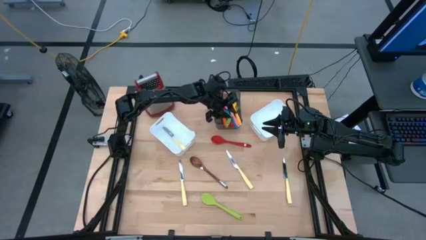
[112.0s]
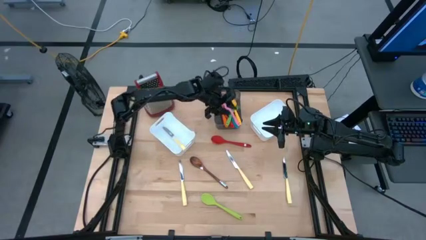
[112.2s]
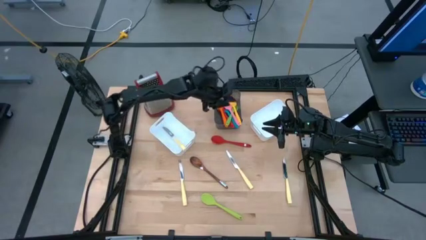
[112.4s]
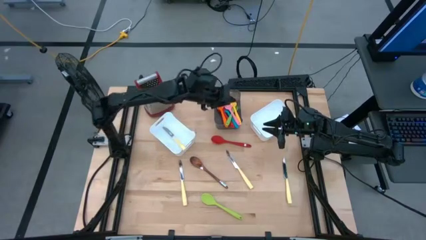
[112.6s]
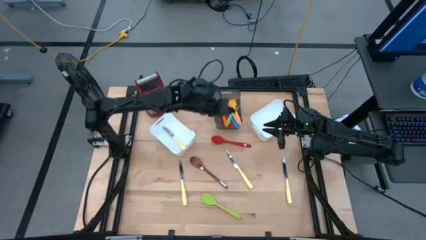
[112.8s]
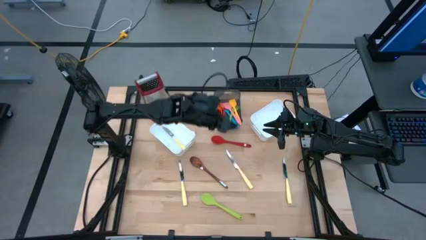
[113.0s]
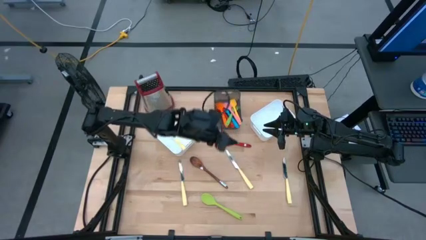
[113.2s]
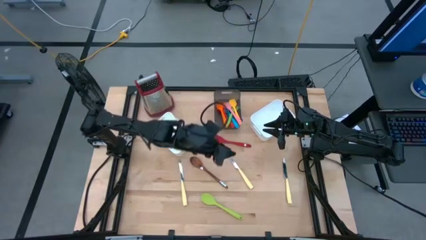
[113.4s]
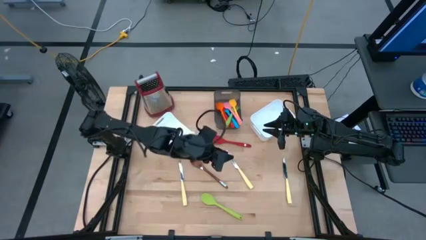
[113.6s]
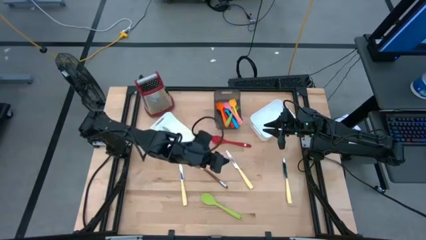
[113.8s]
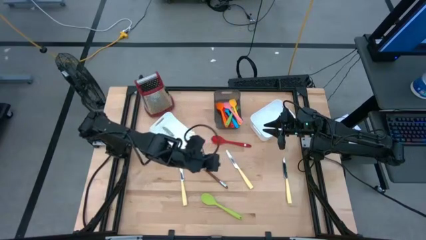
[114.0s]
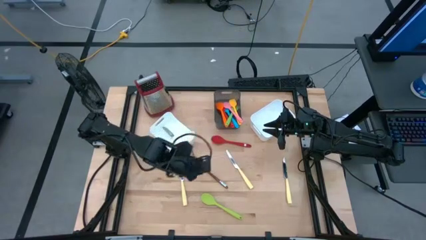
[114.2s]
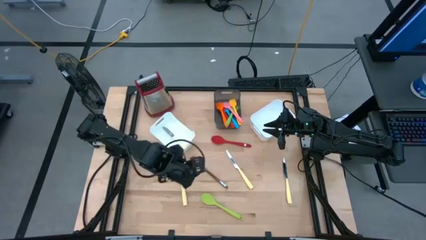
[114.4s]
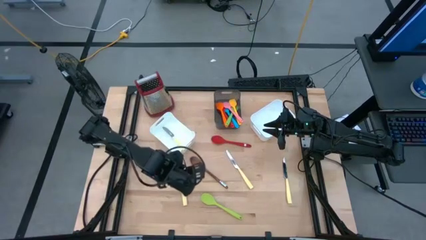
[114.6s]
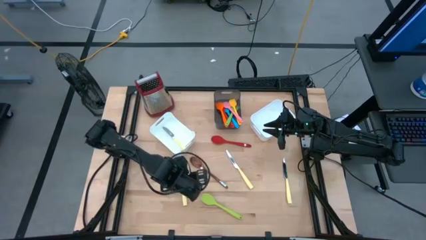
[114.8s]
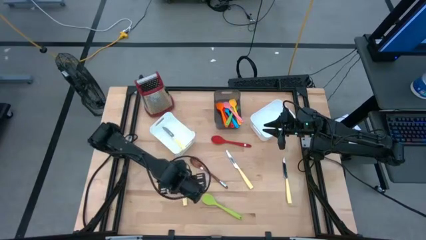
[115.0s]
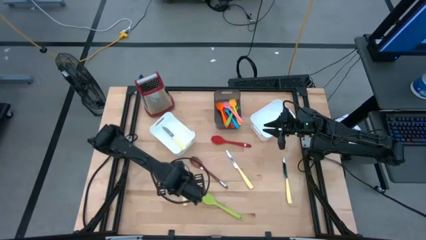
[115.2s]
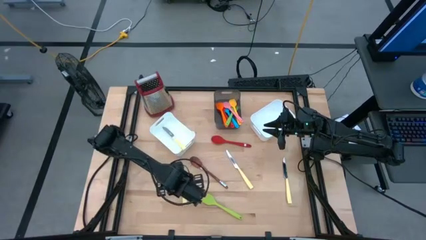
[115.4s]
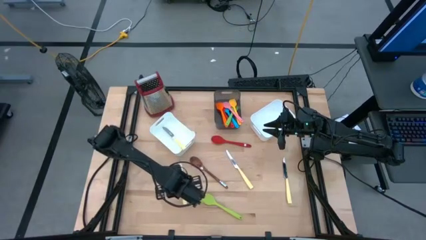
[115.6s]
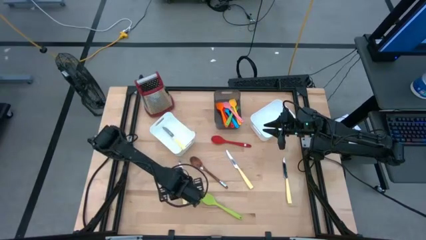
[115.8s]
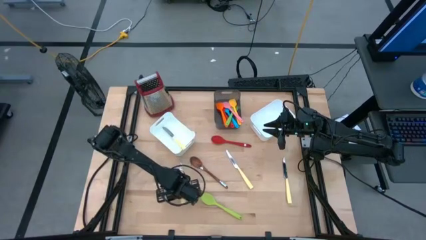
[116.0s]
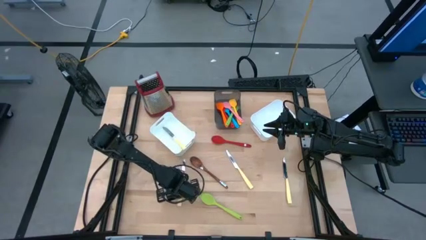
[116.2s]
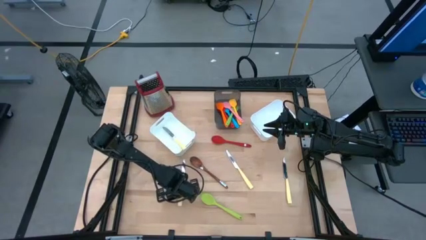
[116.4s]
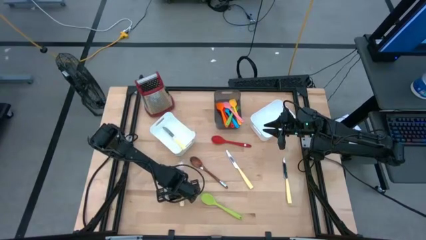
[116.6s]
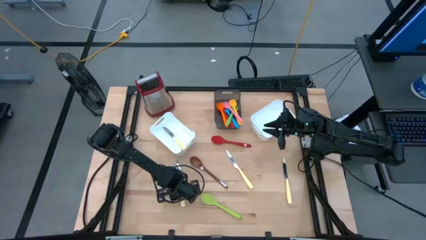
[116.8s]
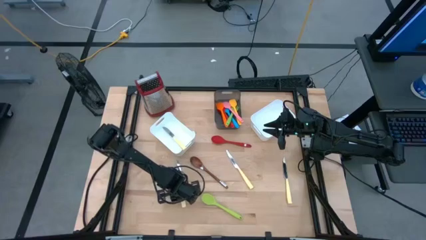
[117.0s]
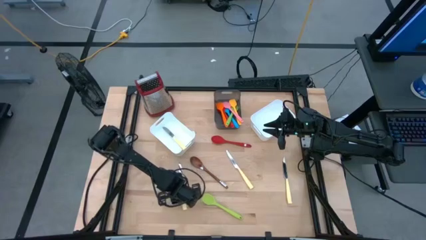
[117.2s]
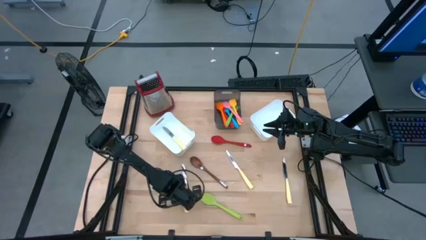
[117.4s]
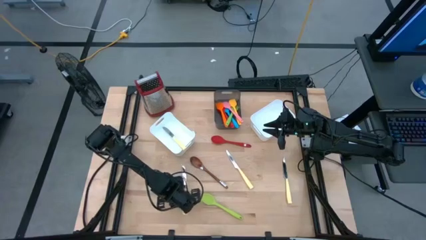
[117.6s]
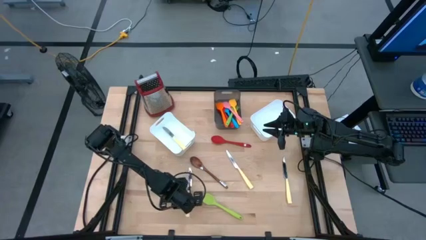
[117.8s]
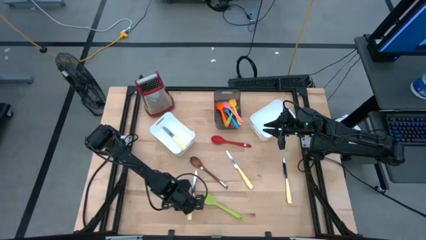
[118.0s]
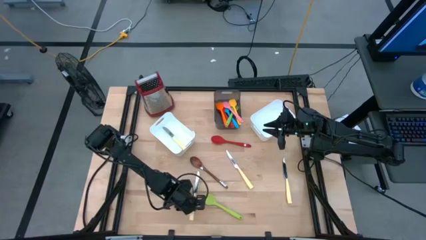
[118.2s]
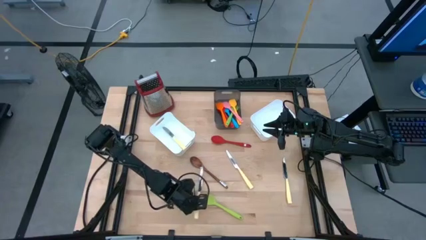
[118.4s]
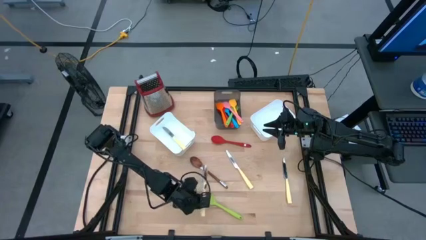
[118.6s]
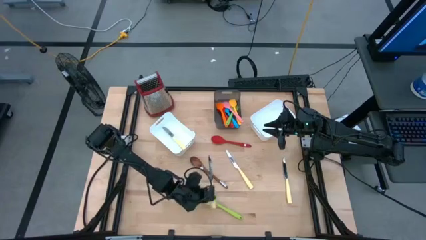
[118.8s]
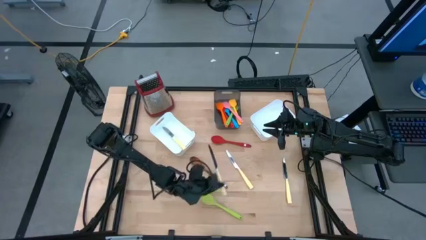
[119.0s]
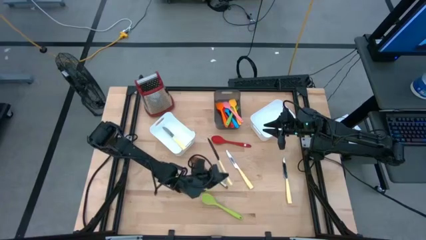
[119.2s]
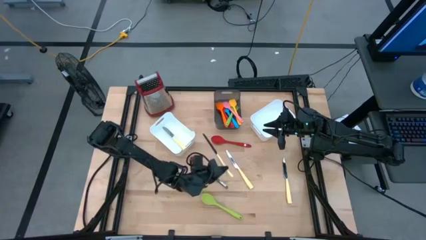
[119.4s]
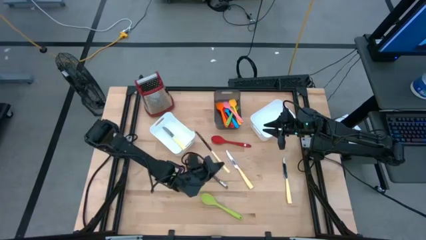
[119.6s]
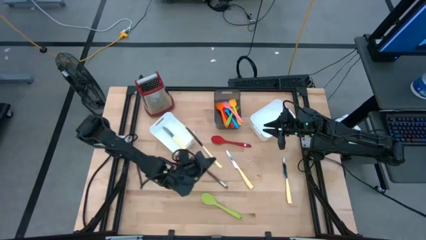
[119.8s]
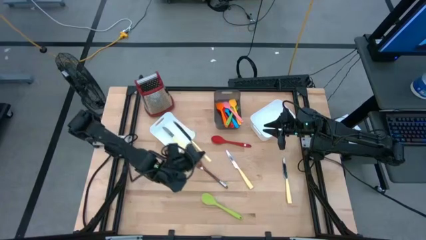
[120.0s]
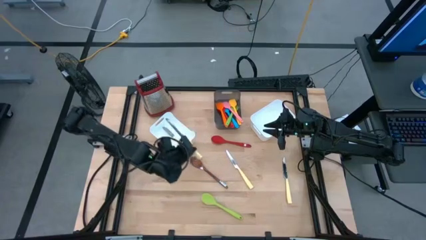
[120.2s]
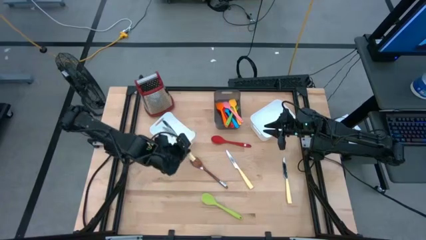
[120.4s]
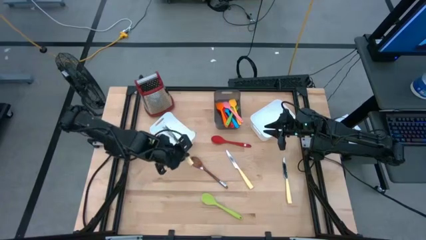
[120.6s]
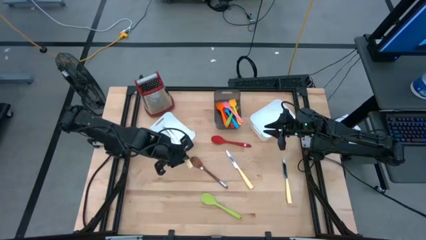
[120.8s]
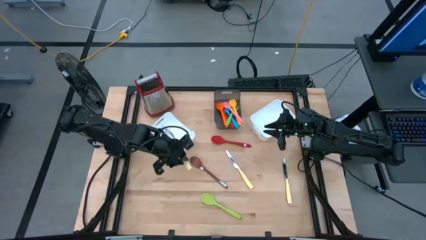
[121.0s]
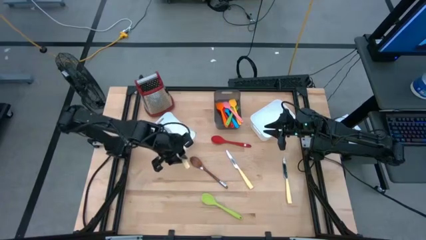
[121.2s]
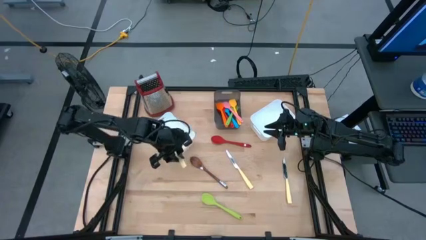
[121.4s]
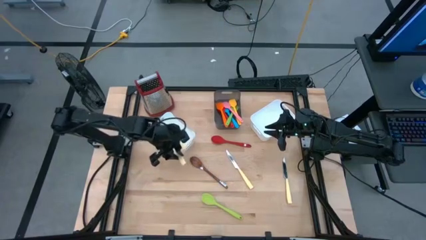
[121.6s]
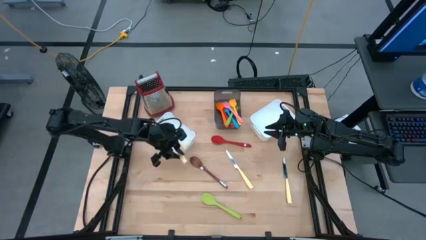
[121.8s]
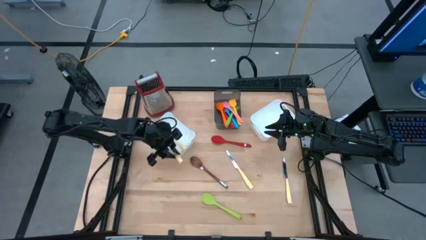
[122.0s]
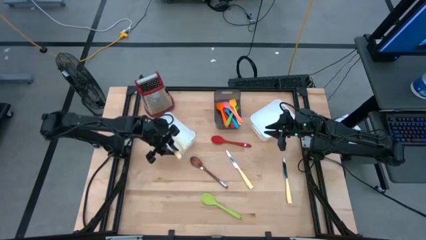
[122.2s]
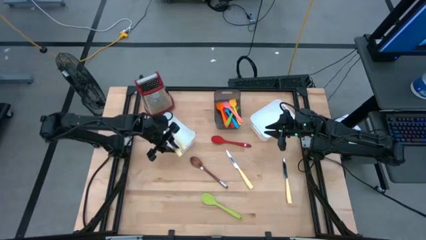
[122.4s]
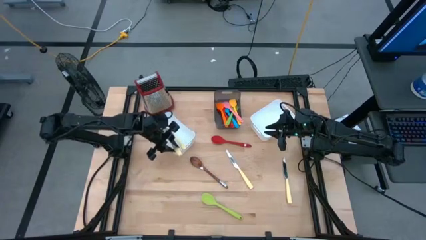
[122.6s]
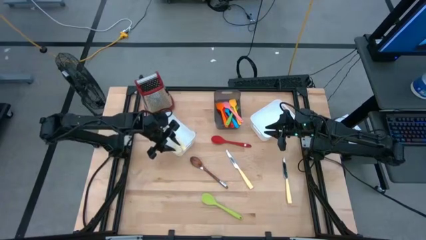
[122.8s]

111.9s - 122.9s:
Task: Pick & Place Kitchen Items
Put the yellow table knife into the left white bin
